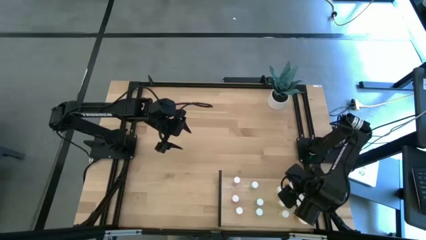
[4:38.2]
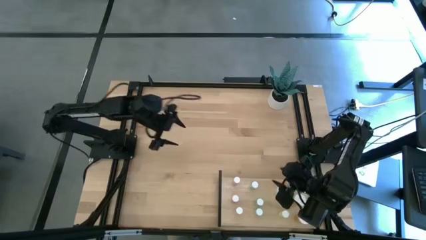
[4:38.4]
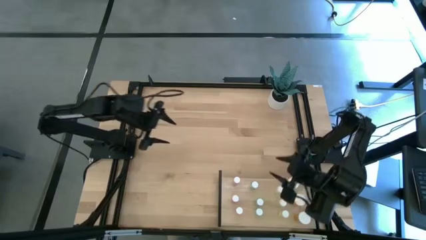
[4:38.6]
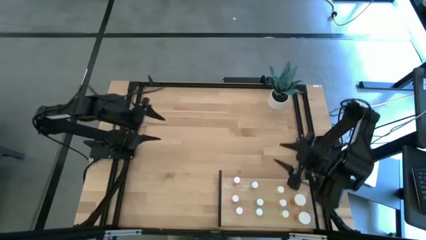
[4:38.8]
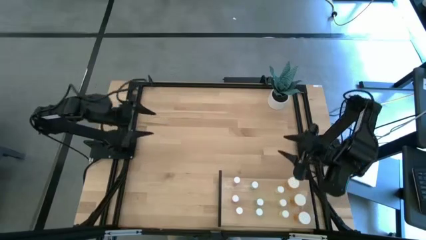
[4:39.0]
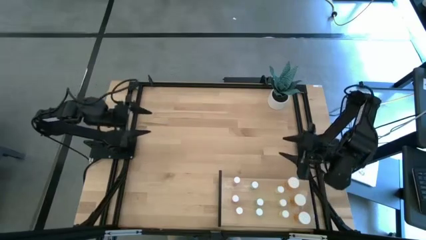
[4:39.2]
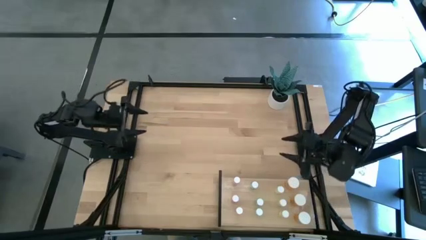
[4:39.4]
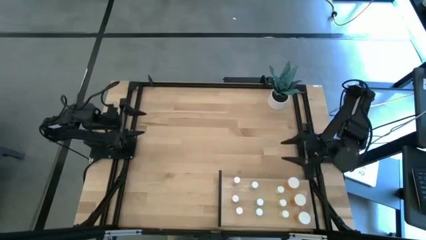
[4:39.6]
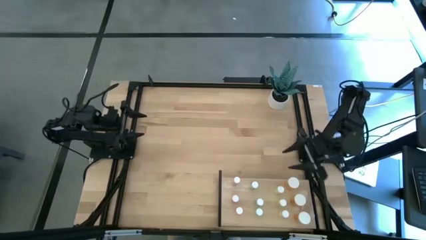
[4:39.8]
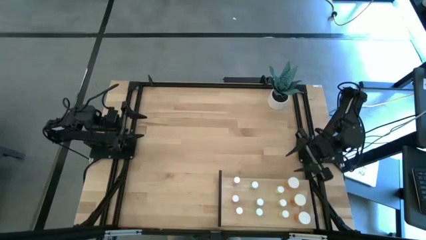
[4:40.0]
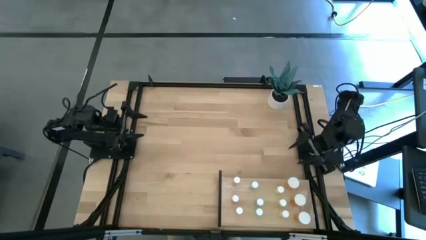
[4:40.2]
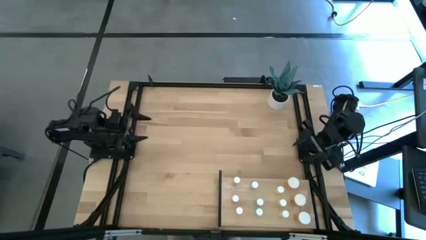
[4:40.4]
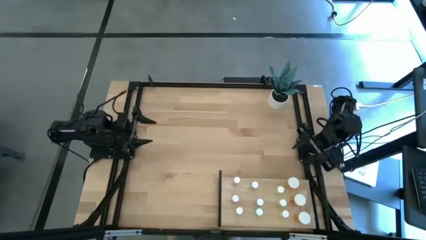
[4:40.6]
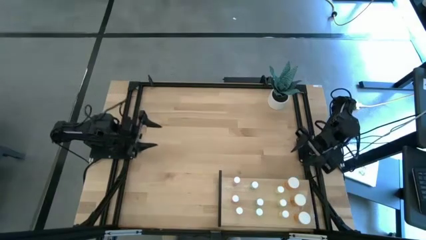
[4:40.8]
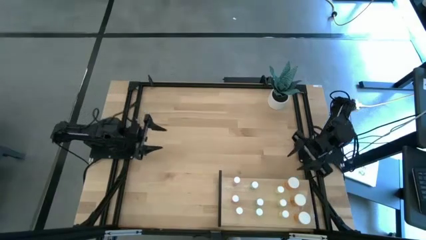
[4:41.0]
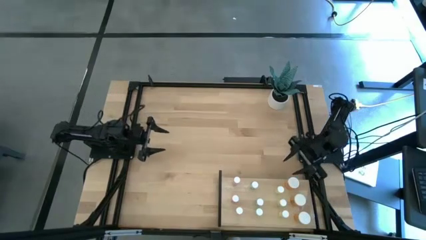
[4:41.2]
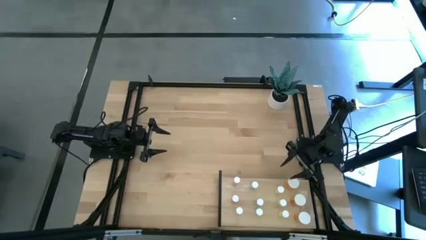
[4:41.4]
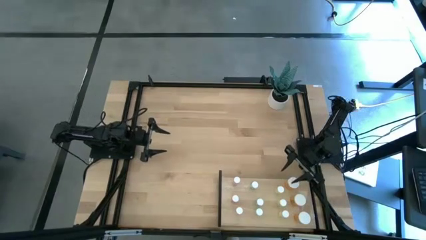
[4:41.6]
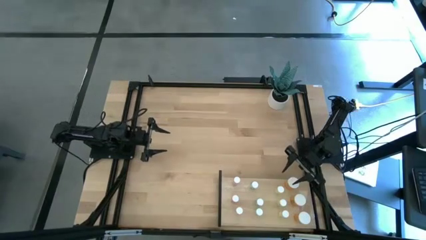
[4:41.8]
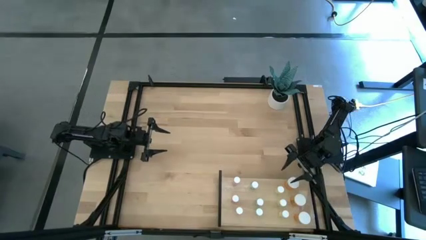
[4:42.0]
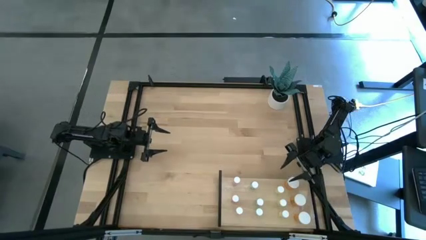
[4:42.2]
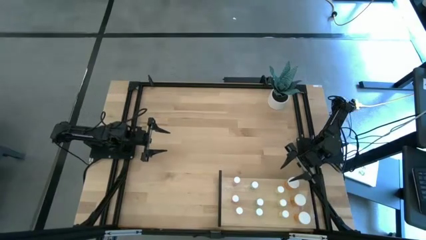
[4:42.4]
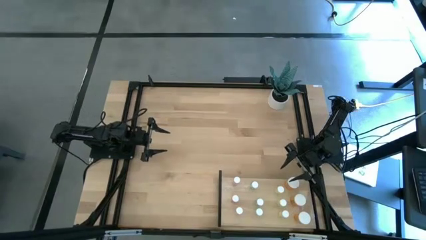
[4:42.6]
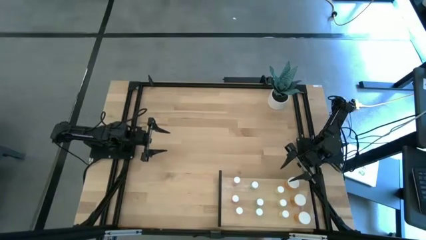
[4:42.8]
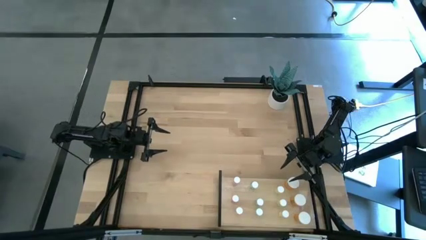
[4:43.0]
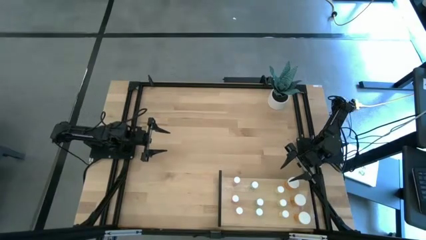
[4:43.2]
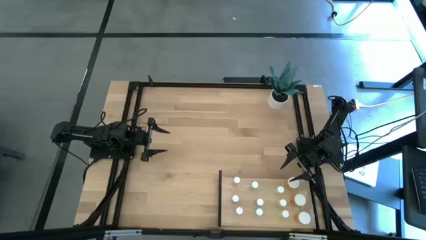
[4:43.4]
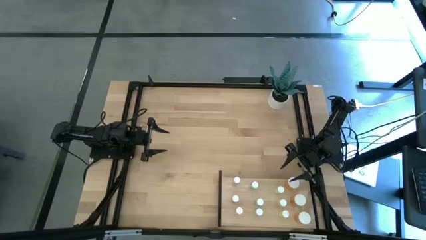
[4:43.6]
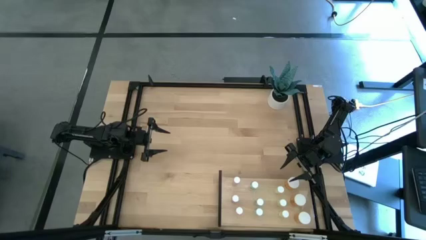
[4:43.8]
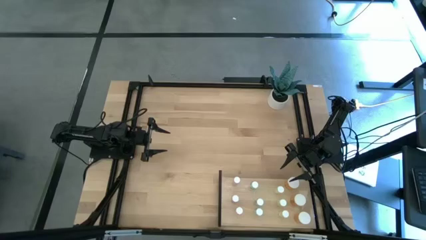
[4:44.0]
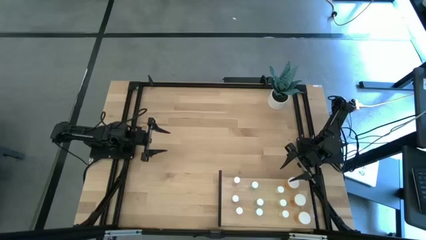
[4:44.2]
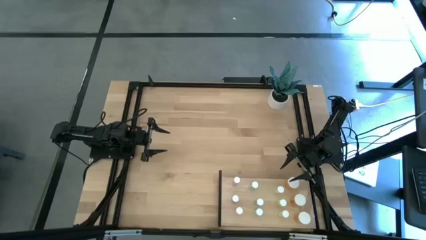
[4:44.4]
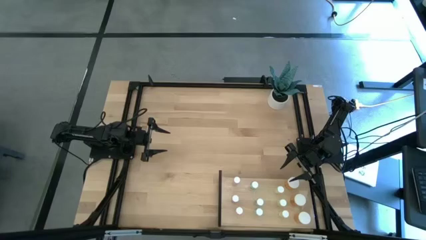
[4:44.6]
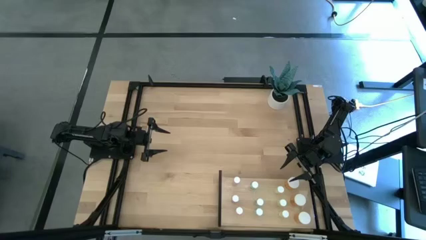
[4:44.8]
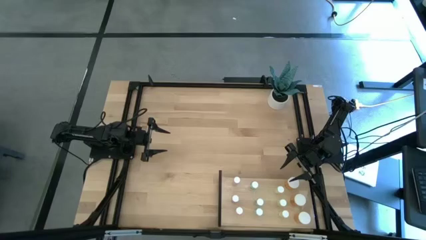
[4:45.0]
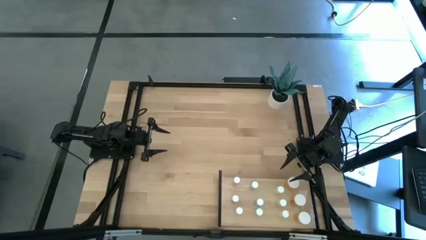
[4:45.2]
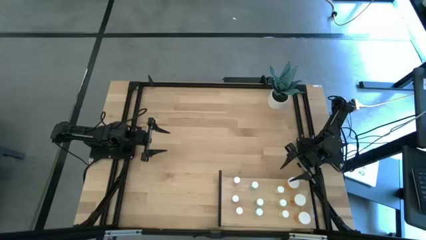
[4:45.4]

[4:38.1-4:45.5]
Task: Pick and place medicine bottles onto shelf by color
Return to Home Position

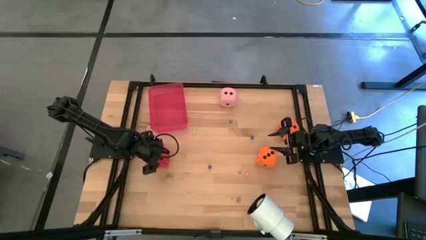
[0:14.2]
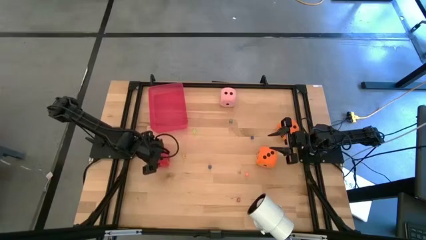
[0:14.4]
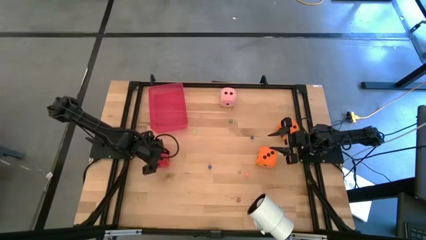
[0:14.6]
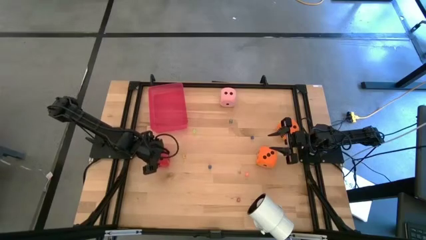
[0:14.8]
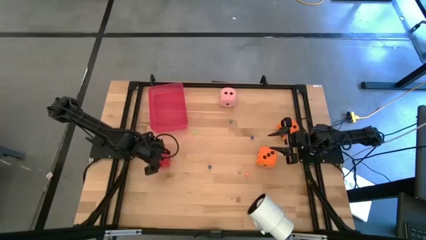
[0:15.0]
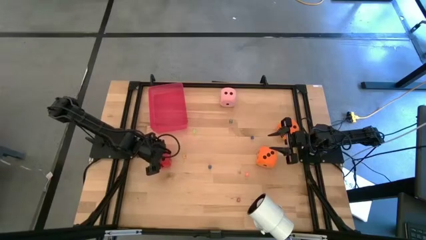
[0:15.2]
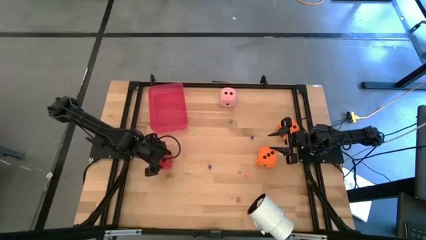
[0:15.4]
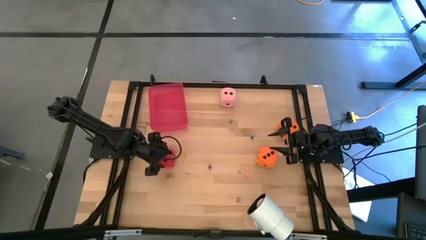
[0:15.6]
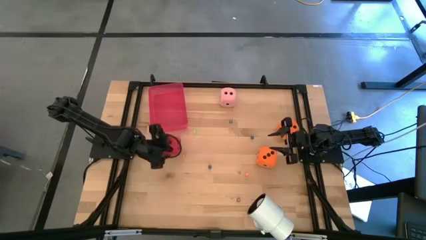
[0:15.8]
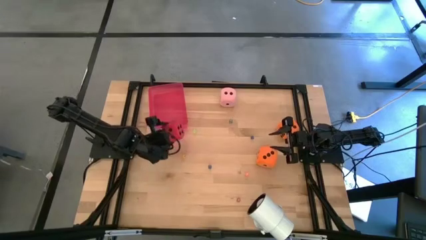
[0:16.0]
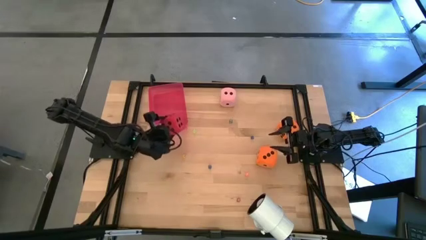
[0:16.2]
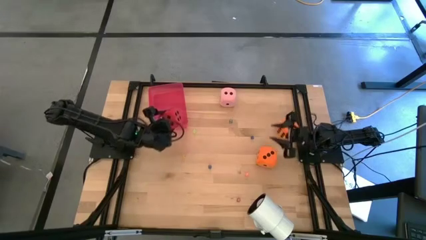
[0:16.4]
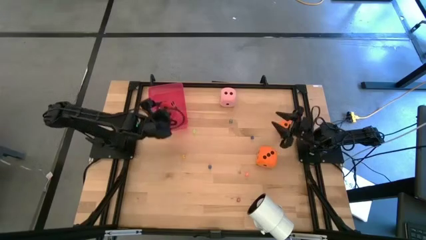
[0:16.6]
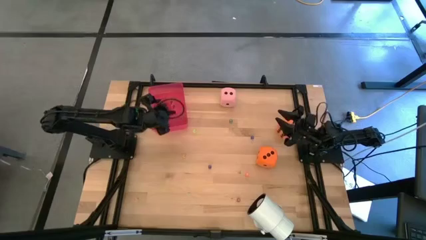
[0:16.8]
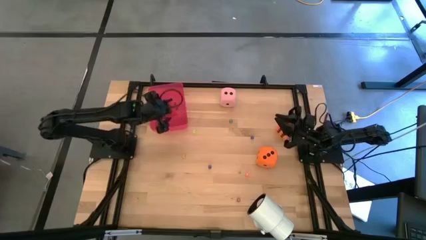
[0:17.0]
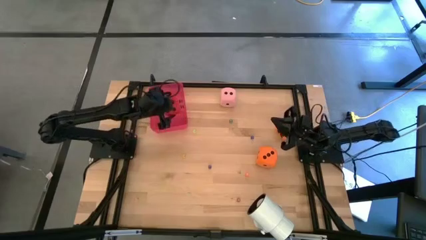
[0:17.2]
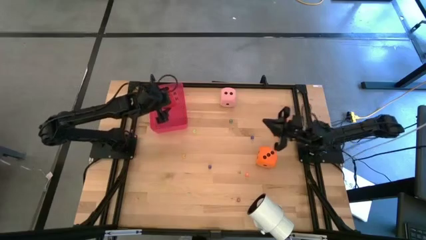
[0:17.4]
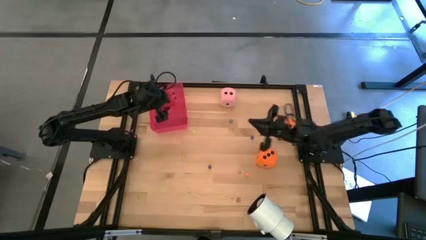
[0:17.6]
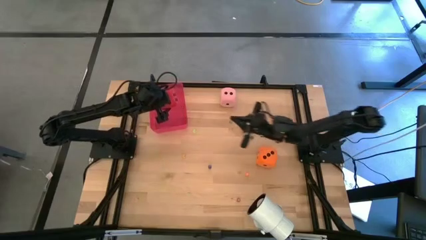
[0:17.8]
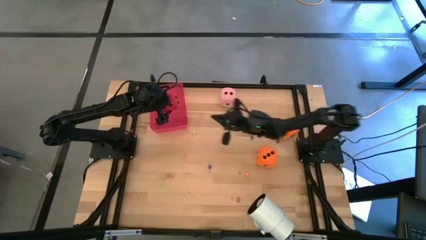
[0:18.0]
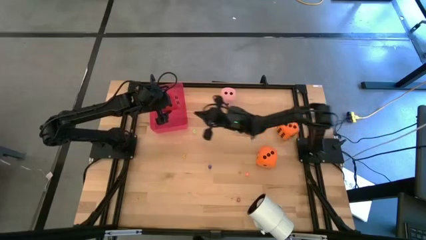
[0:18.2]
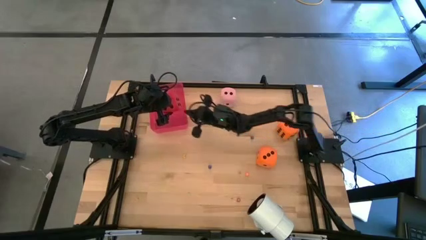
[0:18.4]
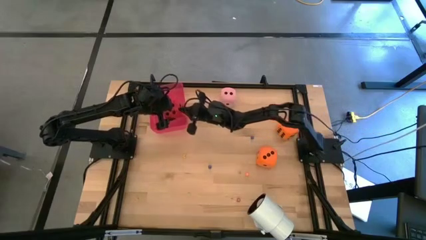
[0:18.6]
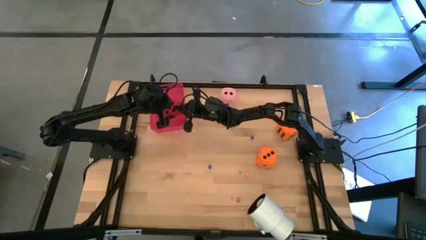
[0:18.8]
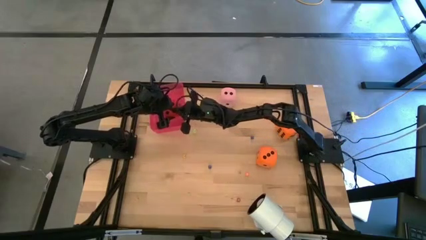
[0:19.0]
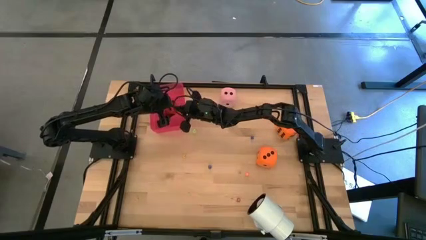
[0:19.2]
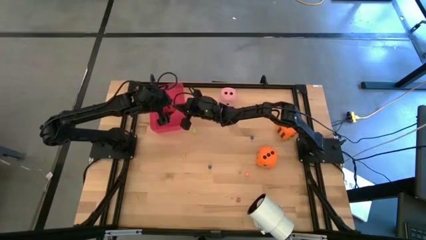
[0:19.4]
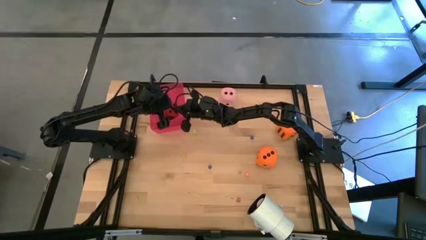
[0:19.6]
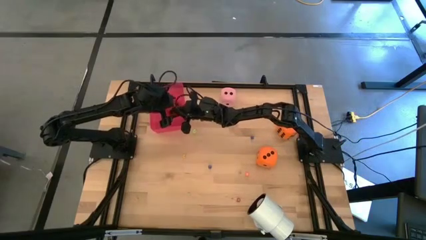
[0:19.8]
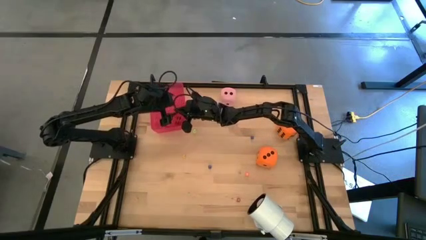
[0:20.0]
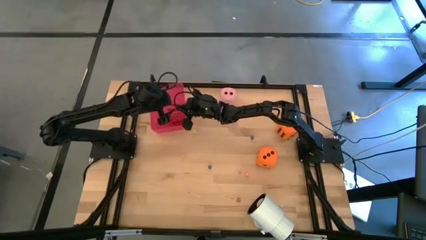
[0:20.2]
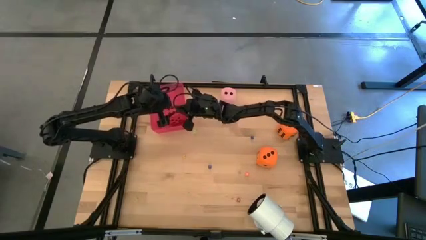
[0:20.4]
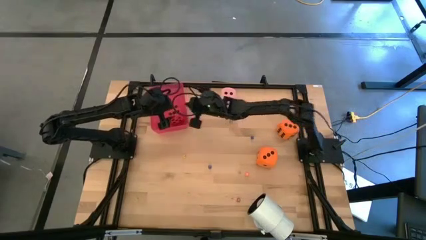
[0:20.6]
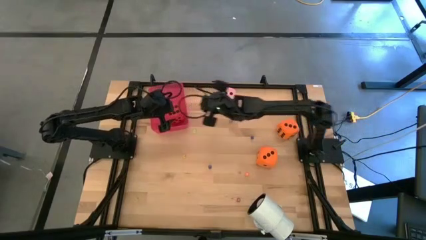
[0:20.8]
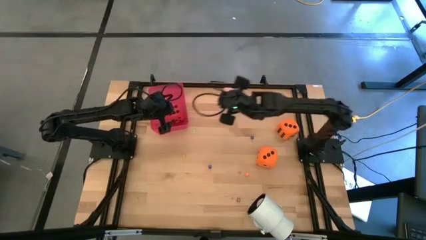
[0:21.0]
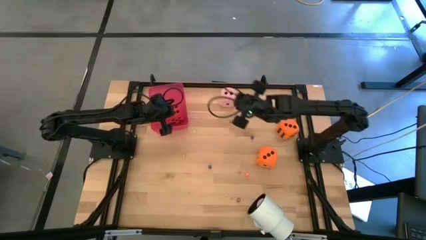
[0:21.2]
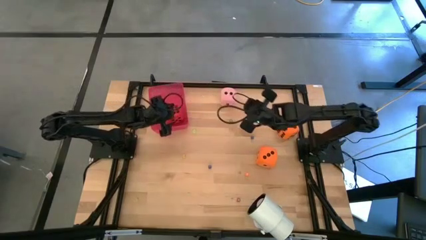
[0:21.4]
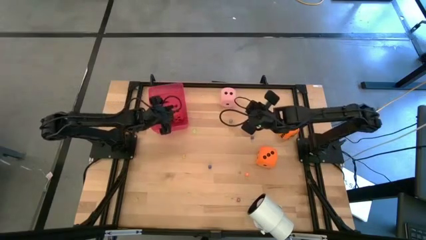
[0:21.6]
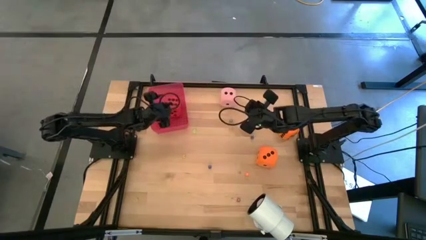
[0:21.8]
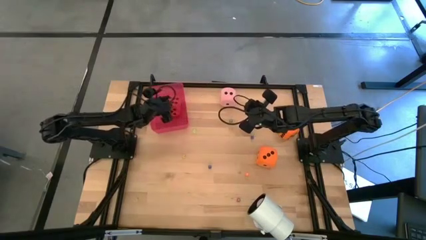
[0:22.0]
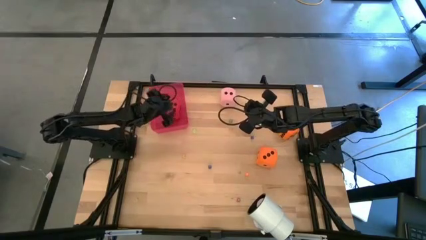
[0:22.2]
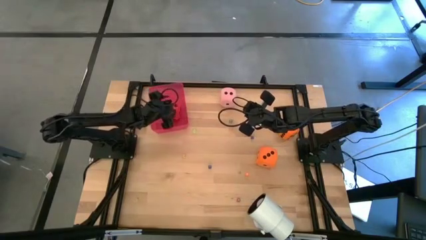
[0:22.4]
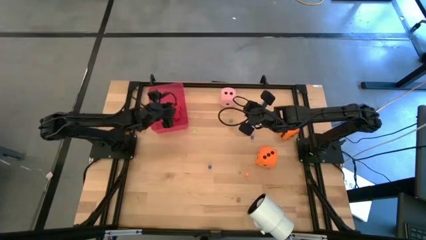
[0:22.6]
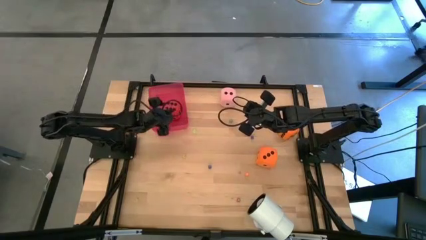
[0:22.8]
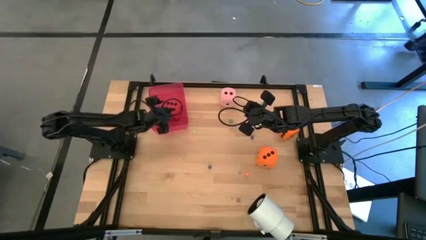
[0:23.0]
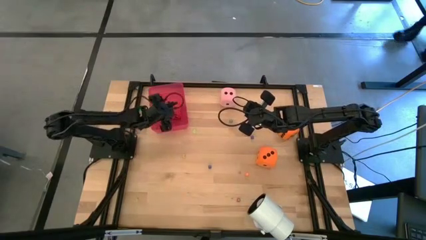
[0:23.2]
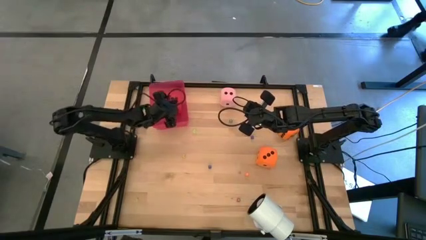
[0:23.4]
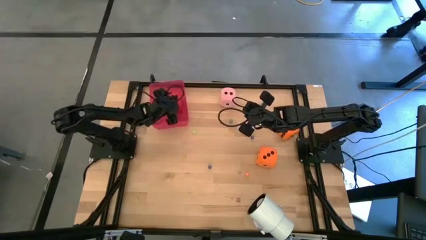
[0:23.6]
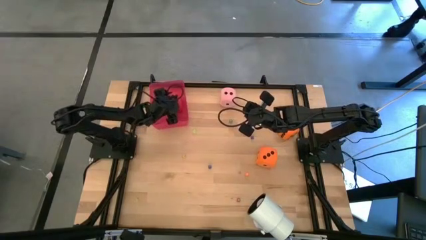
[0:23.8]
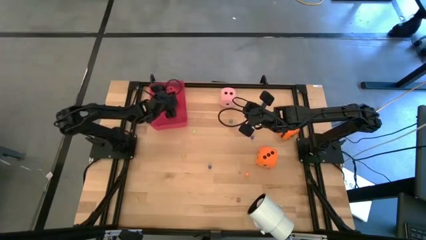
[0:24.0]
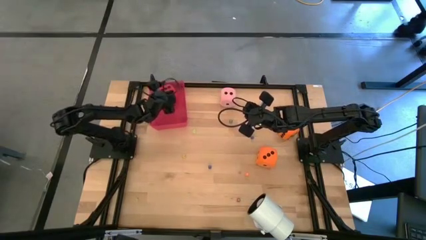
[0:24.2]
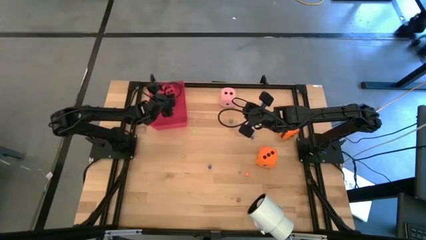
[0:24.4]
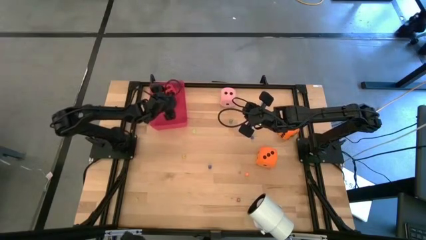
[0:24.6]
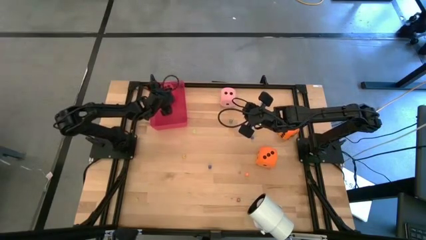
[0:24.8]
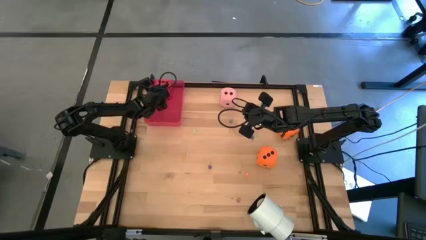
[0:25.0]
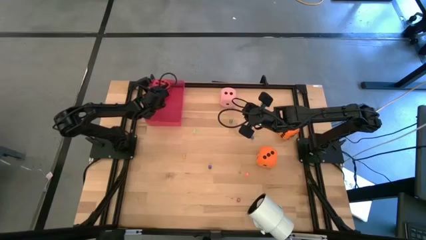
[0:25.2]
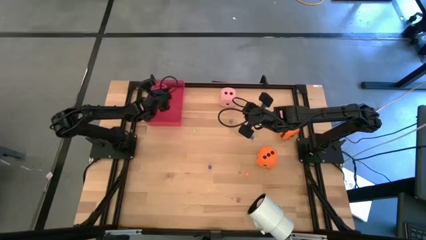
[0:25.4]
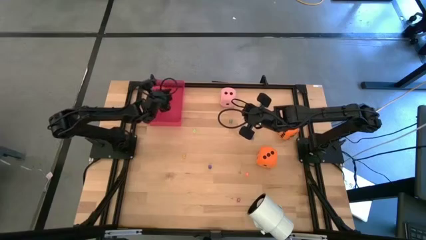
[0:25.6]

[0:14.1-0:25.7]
Task: Pick & Place Dice
Put the big red dice into the bin
